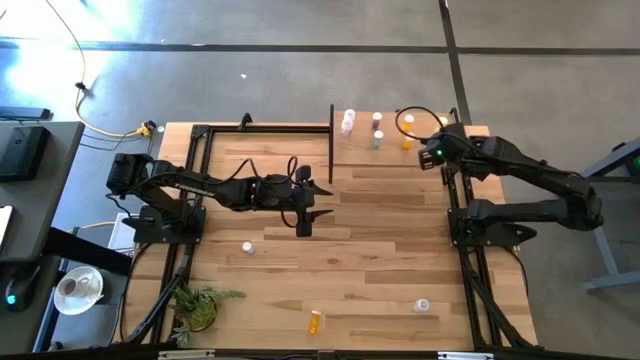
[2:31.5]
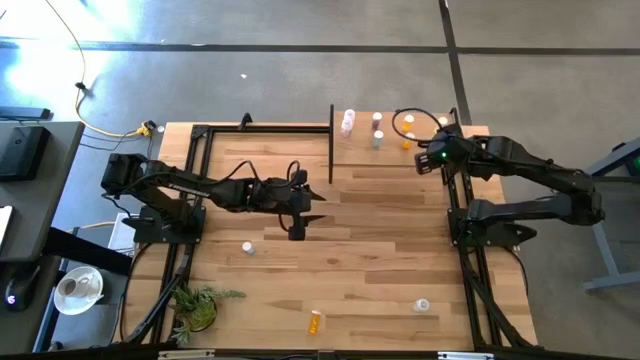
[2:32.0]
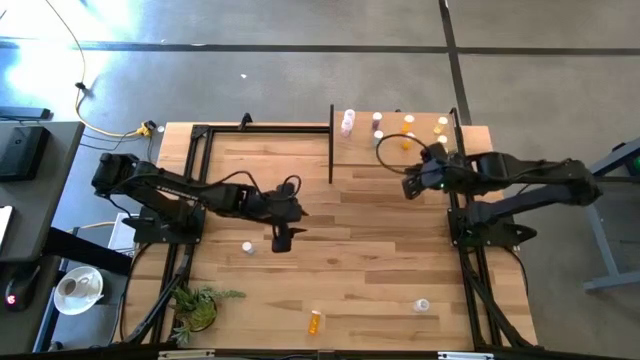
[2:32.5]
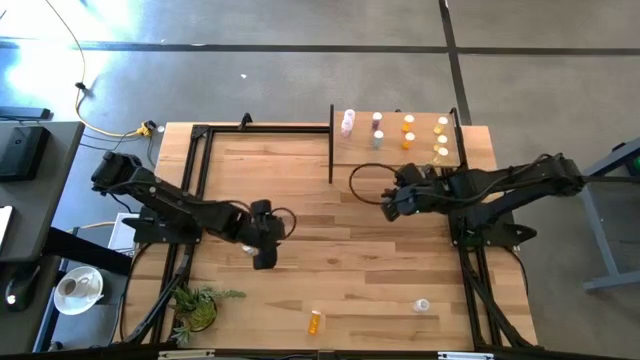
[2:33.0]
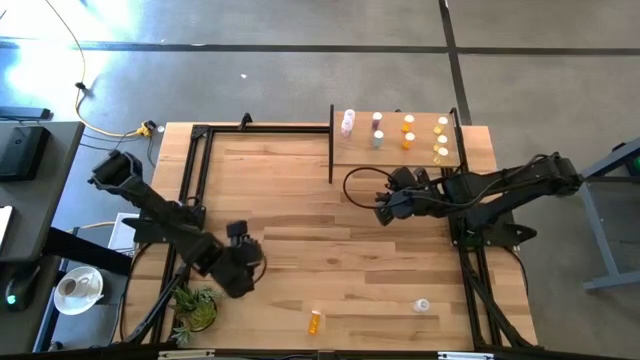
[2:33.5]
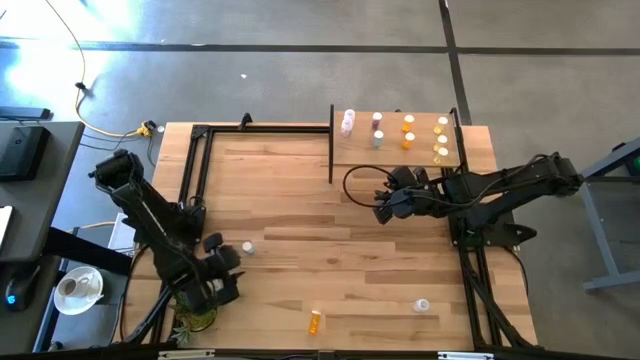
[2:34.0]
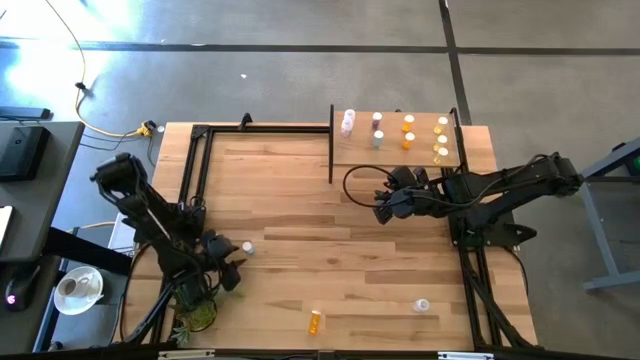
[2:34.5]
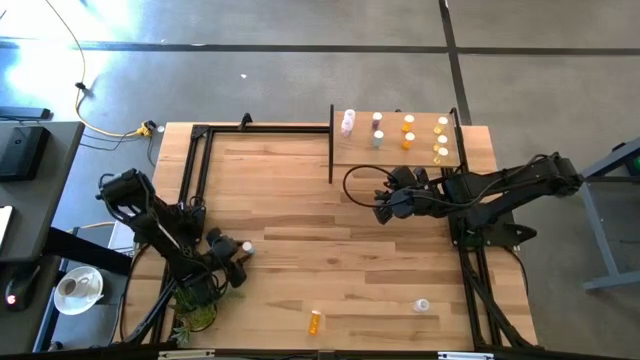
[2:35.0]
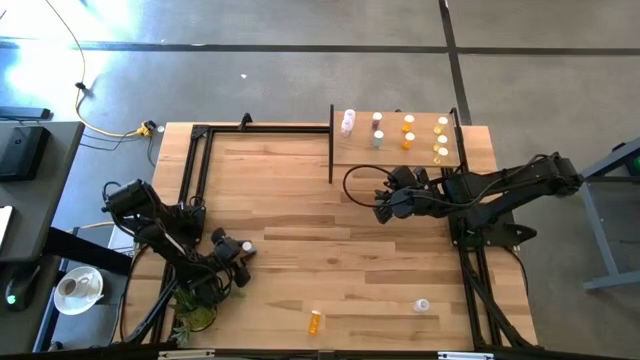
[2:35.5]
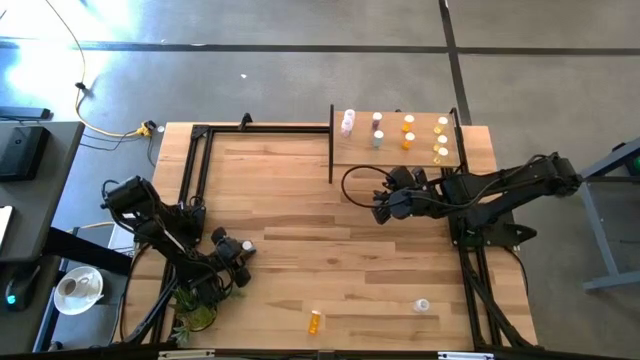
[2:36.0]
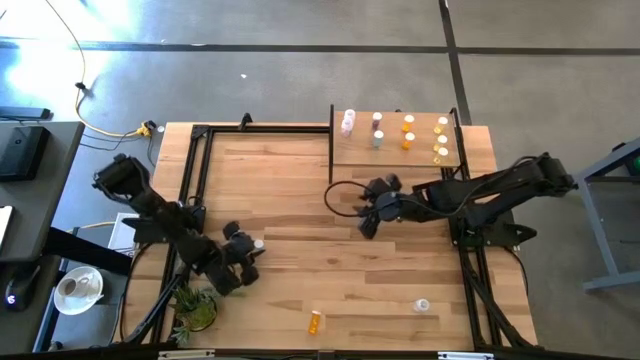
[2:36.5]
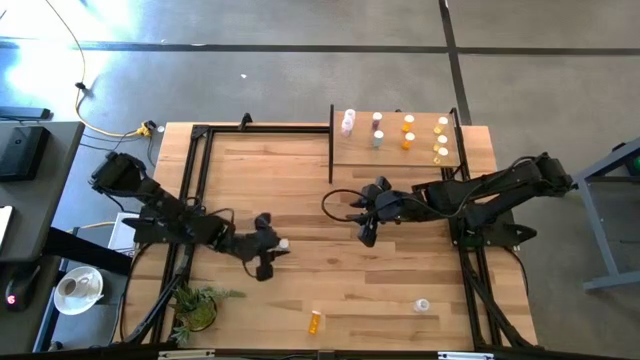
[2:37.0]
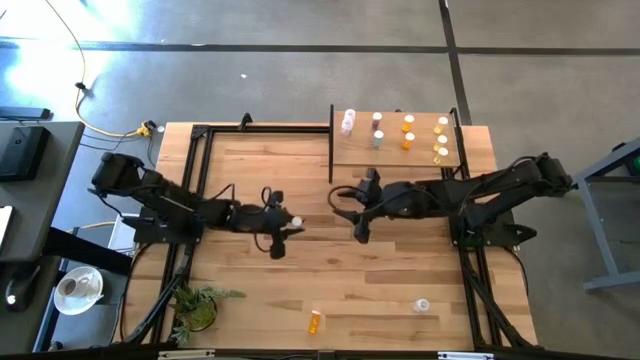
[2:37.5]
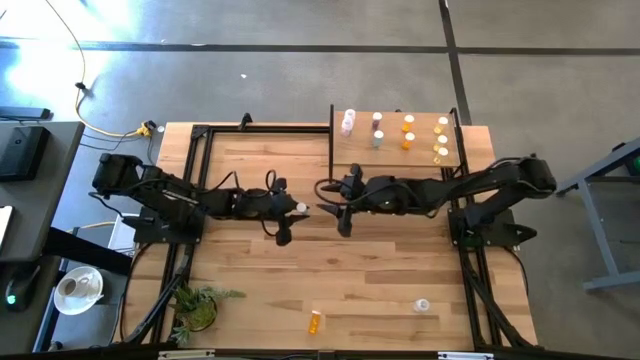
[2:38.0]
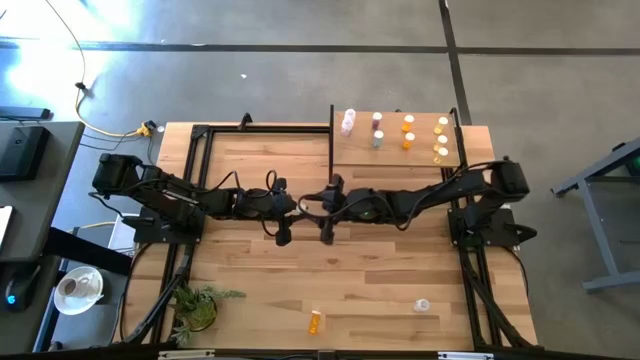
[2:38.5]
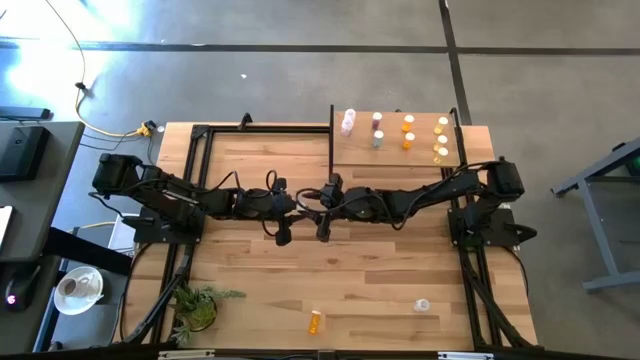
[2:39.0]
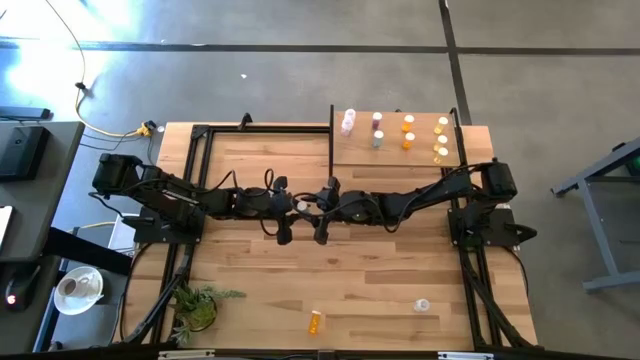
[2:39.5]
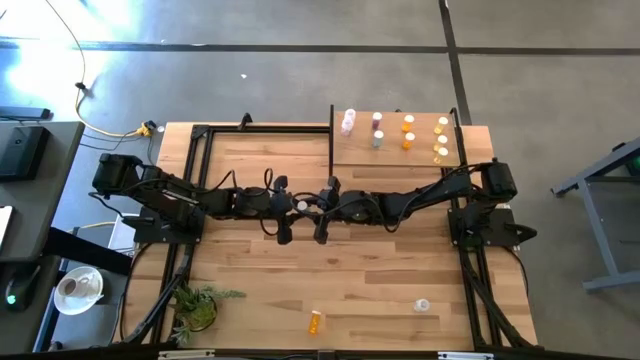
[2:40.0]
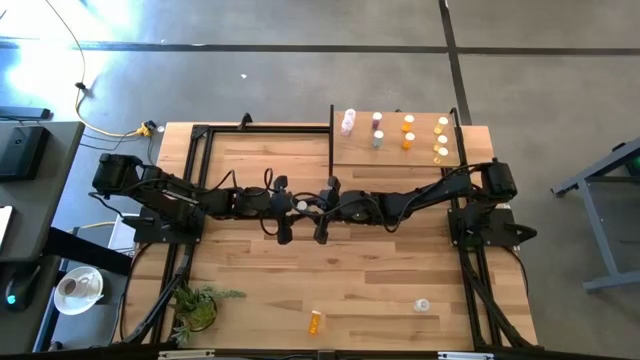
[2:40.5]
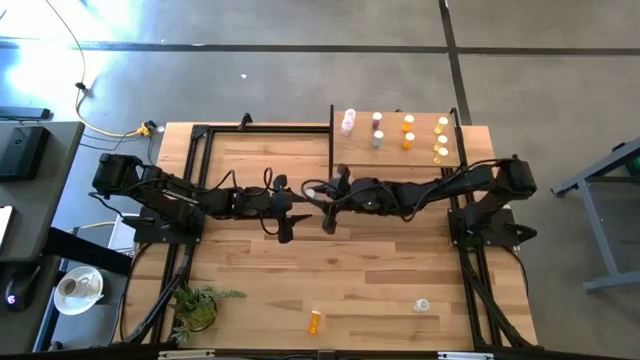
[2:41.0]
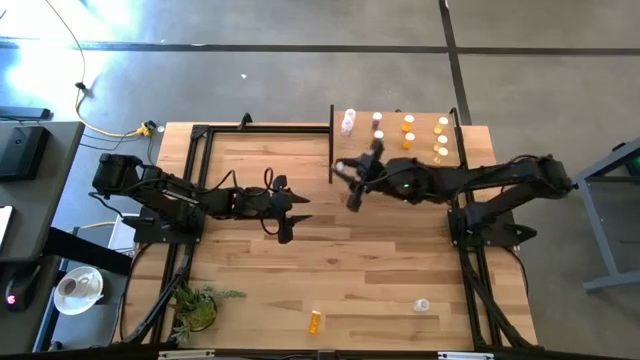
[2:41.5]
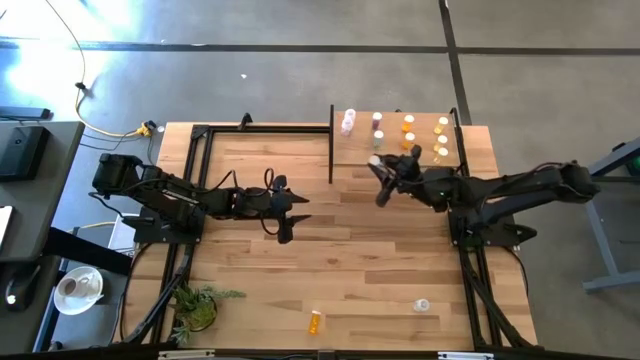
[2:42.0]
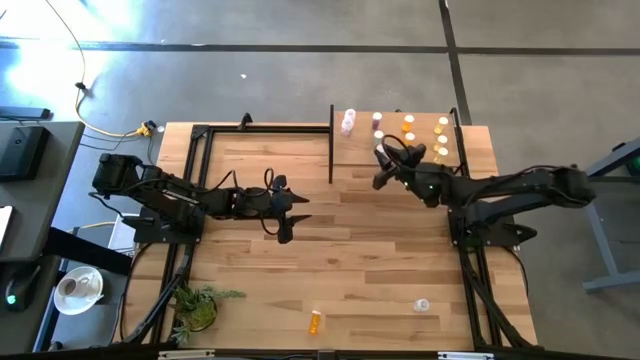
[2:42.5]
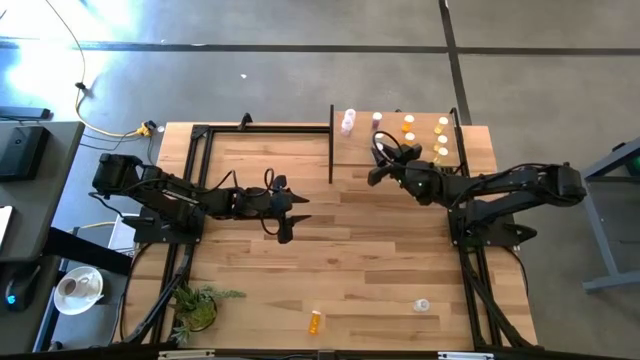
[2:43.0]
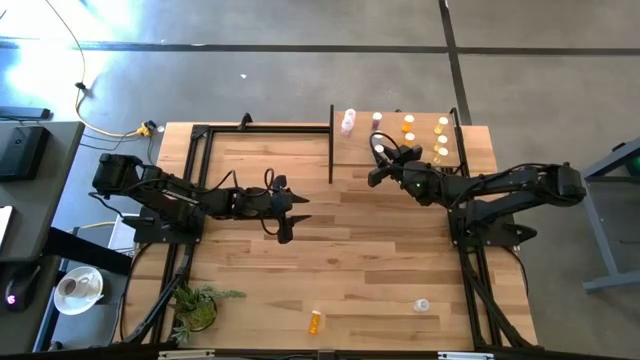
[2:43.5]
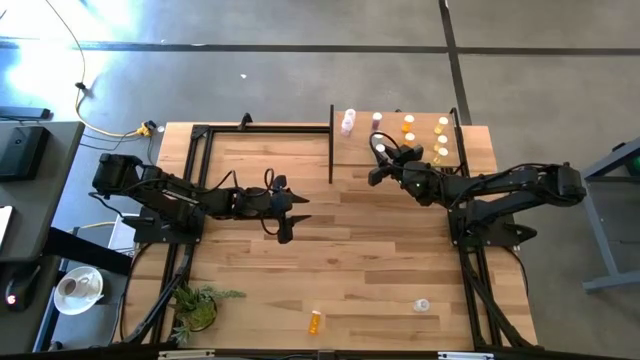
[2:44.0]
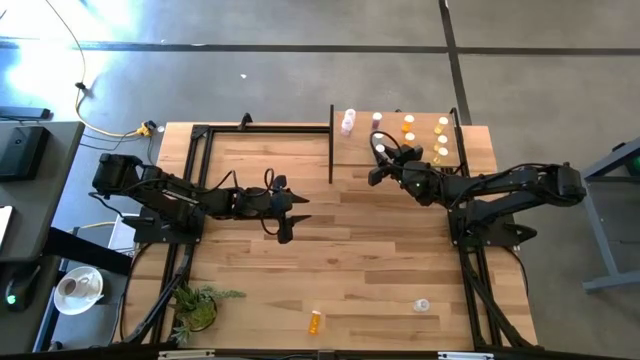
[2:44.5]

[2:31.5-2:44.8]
Task: Pick and place medicine bottles onto shelf by color
Put the blue pill bottle on the shelf aligned with the other blue pill bottles

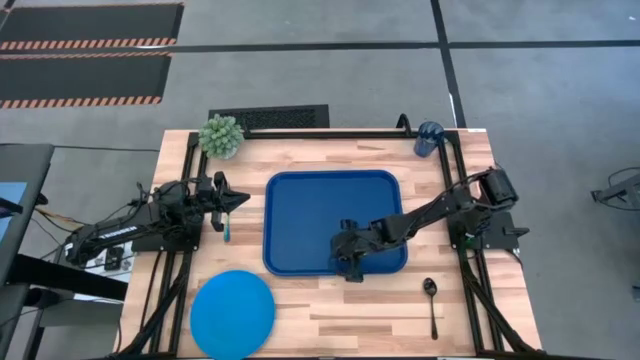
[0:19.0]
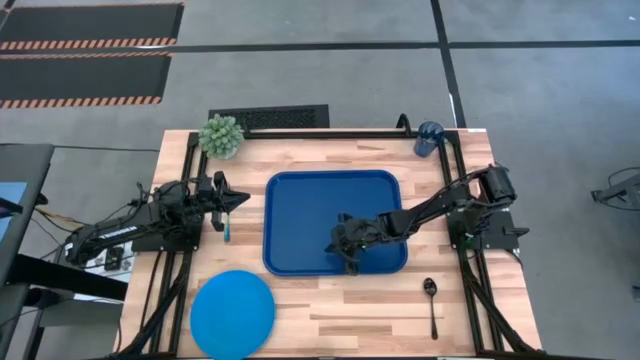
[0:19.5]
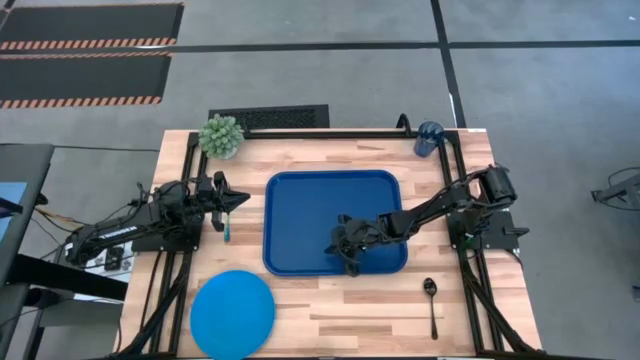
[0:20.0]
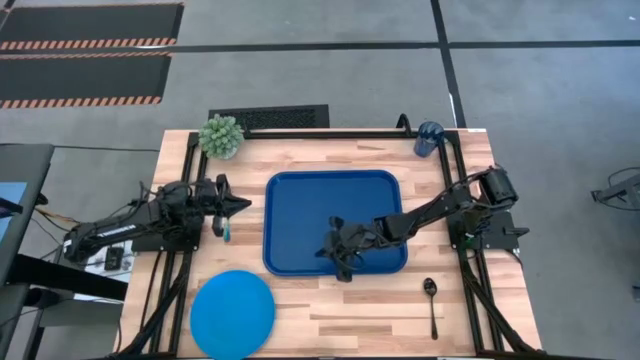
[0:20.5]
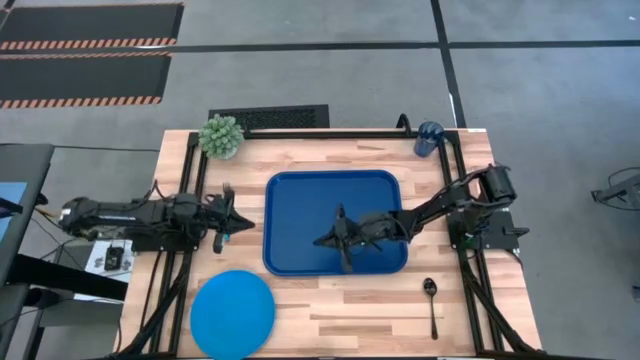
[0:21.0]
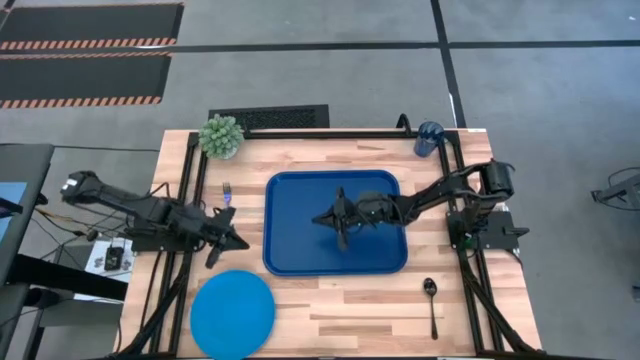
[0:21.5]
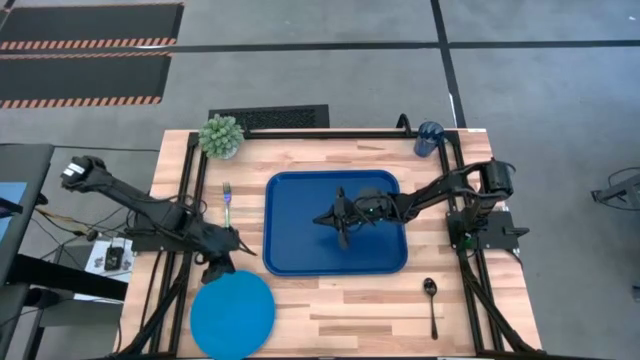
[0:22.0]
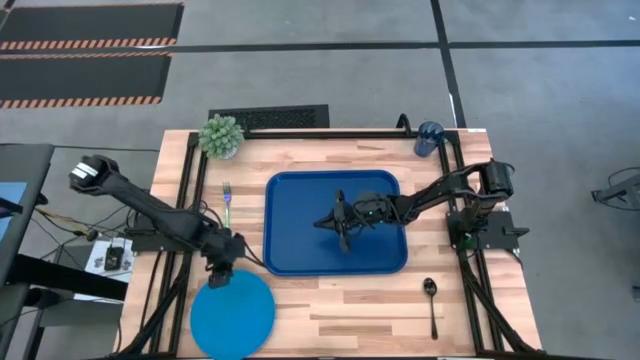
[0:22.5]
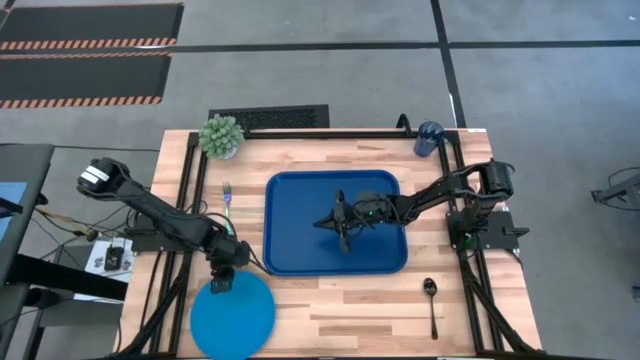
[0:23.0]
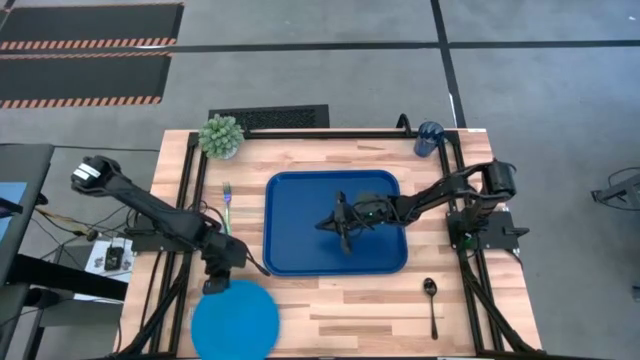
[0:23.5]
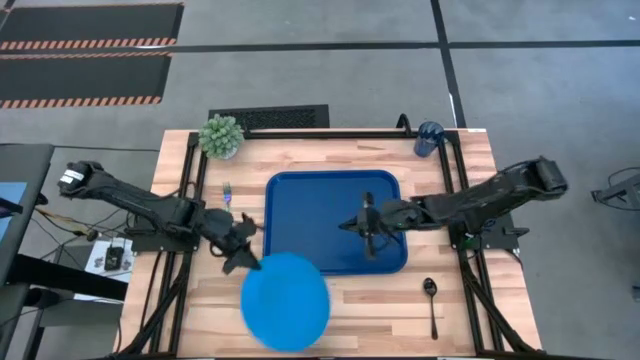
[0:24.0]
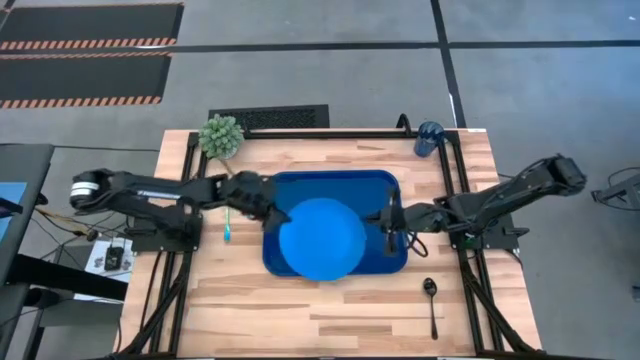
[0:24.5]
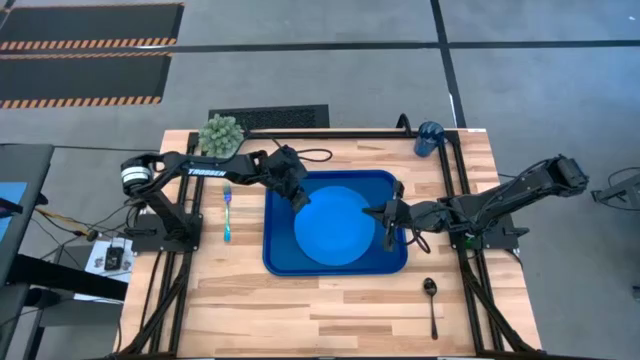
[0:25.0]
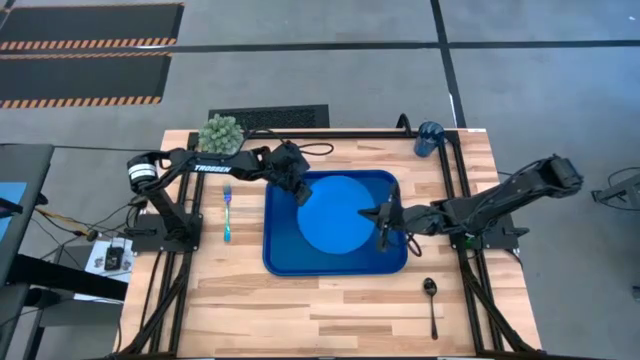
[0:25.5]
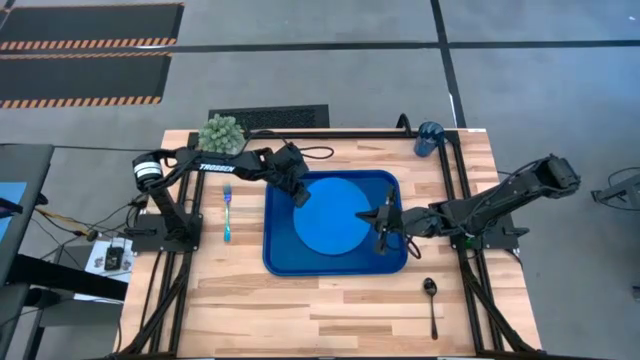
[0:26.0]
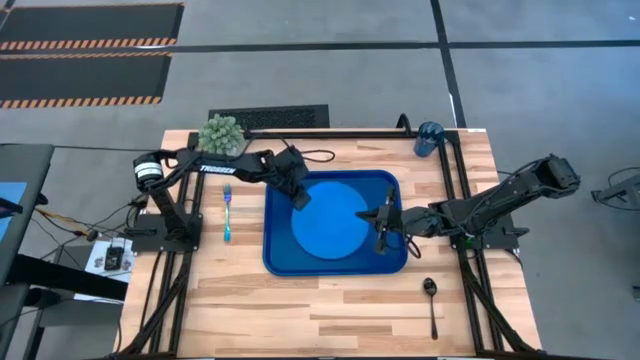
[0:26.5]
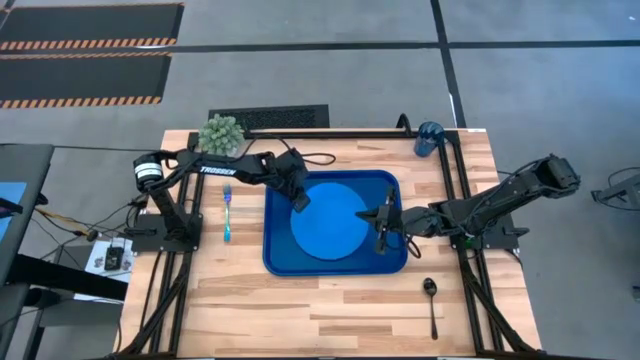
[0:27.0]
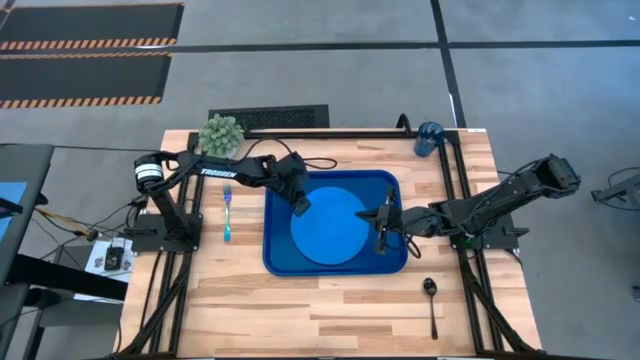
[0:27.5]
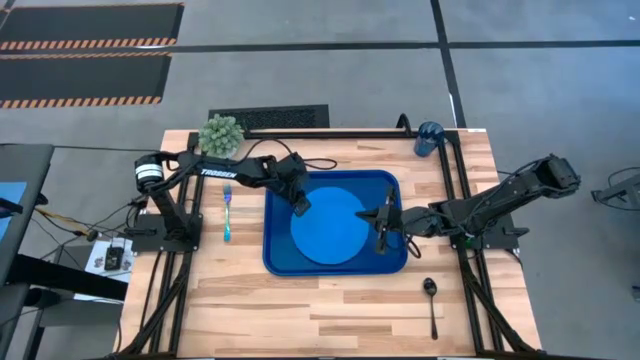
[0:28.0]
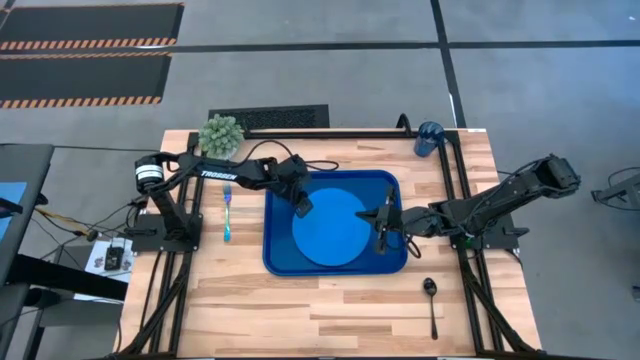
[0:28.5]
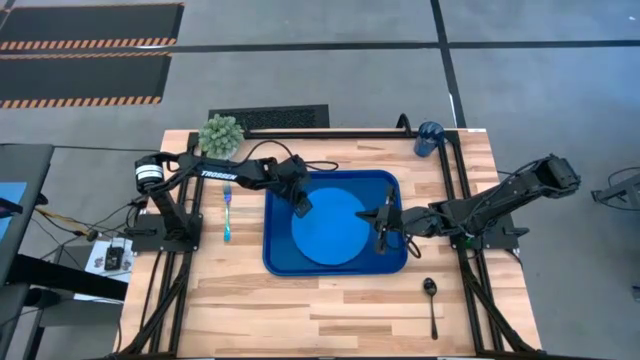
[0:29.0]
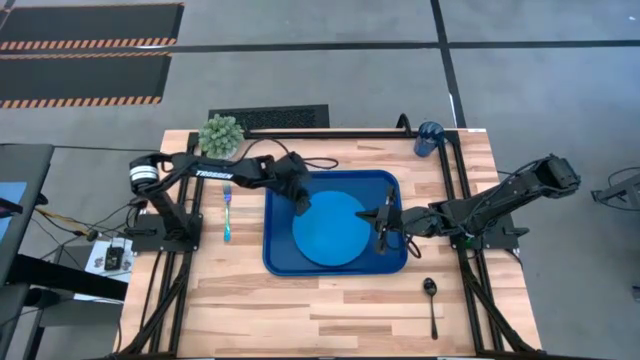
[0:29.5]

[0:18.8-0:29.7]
Task: Pick and place plate/cup/fork/spoon on tray
Put the light blue plate on the blue tray
